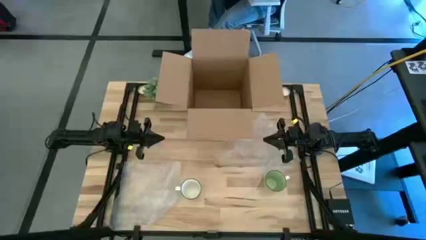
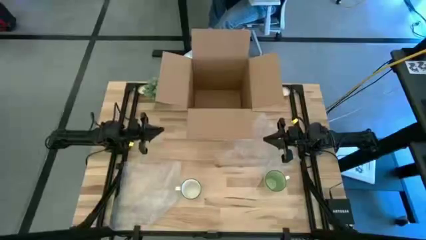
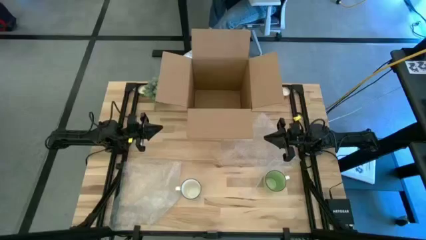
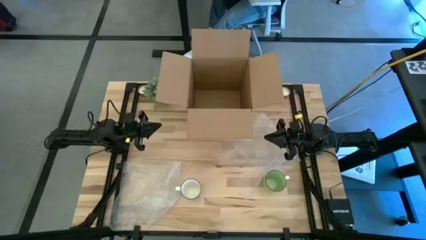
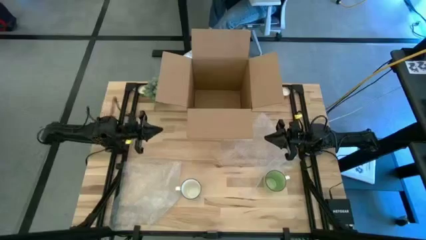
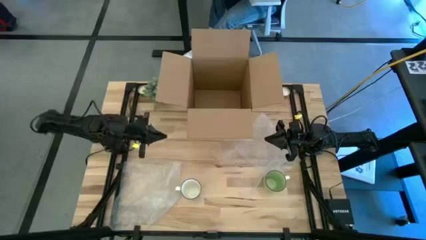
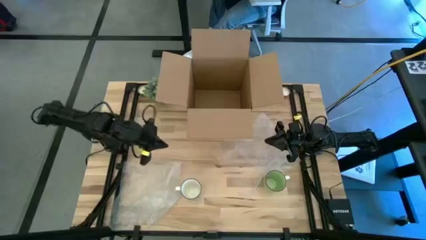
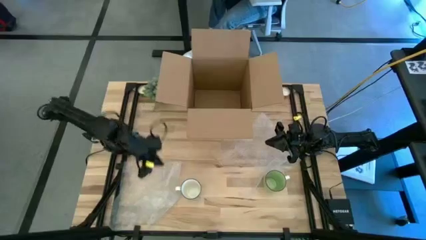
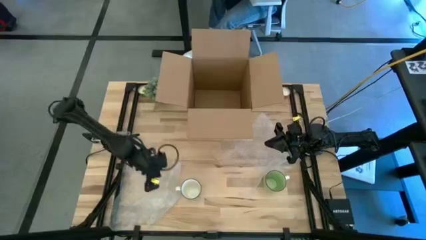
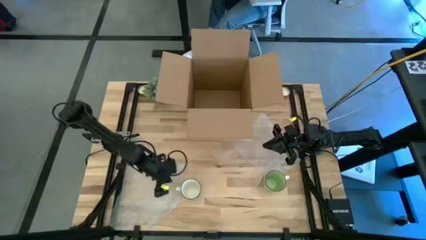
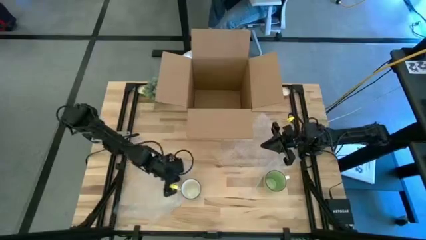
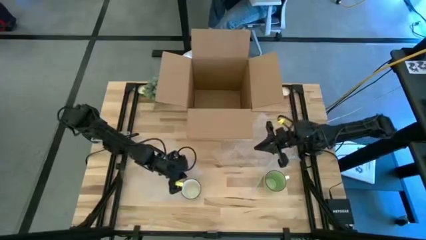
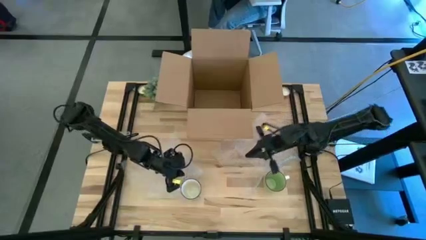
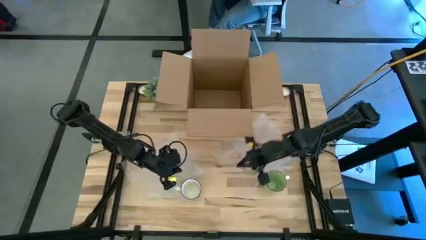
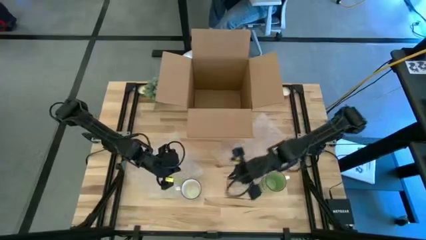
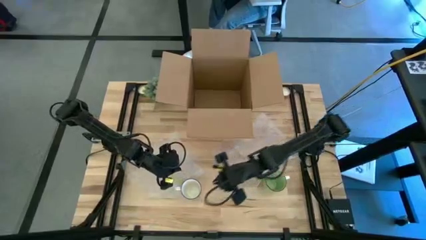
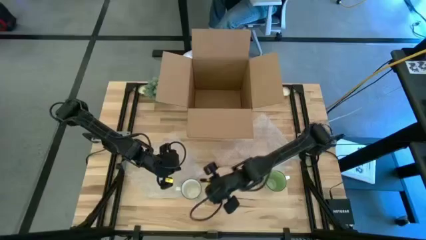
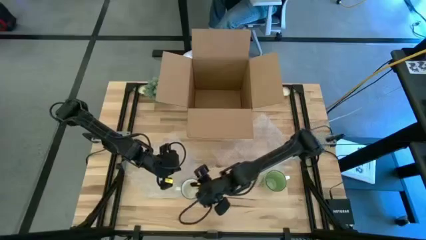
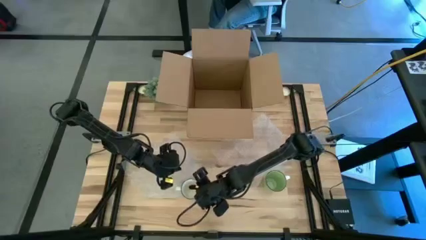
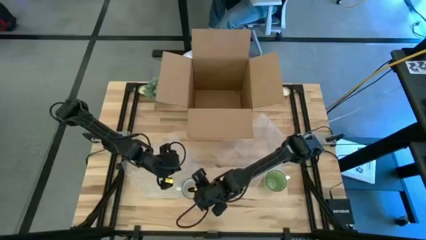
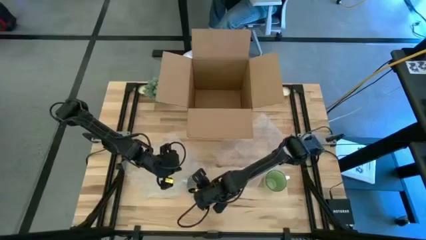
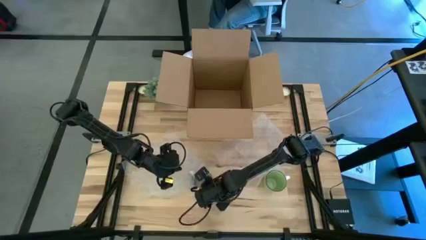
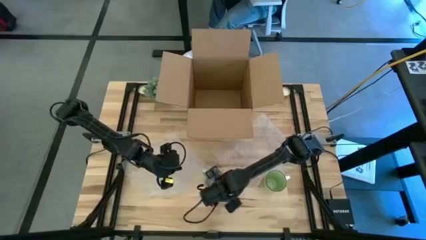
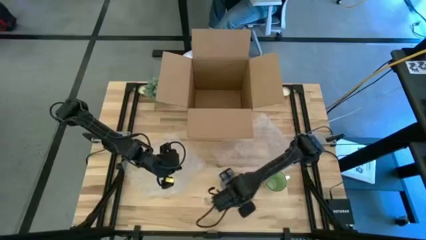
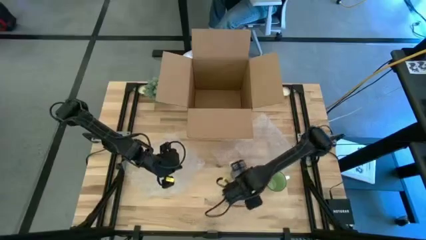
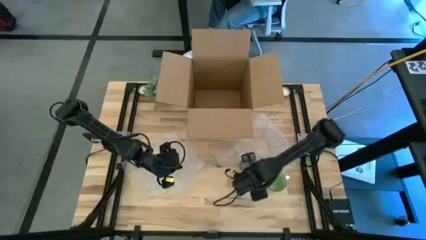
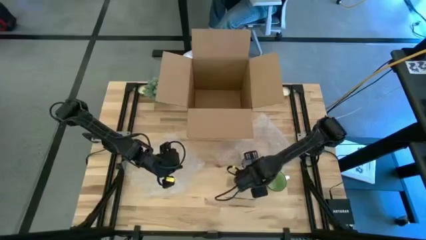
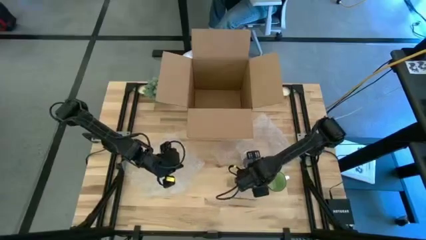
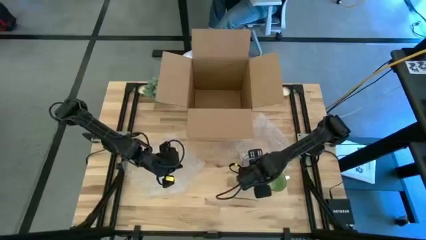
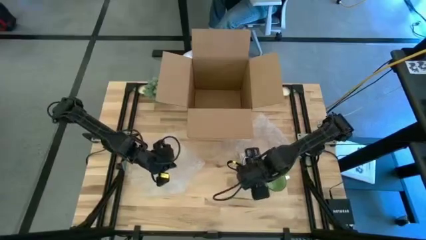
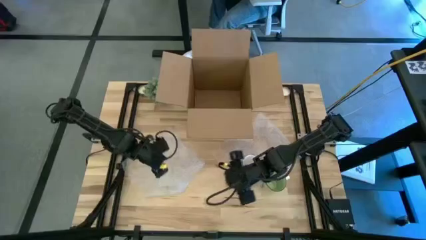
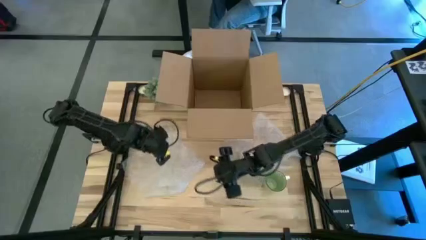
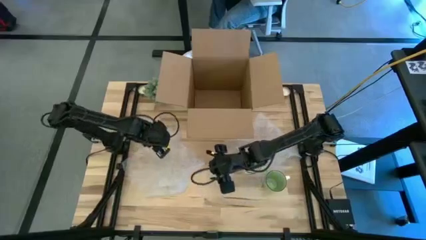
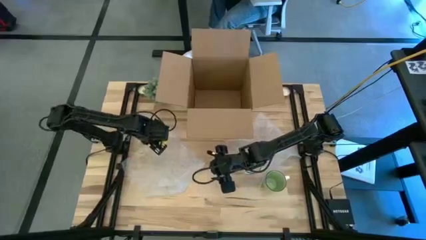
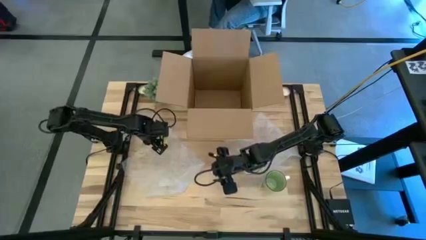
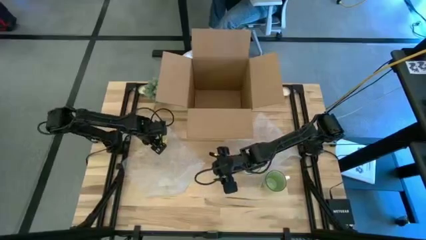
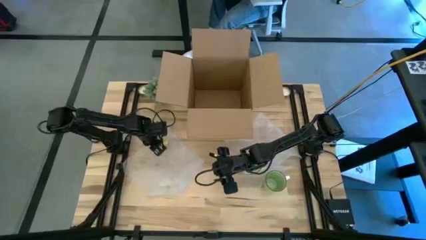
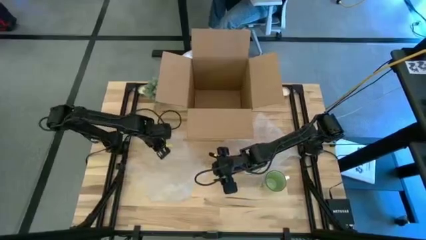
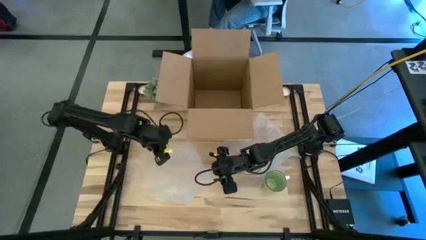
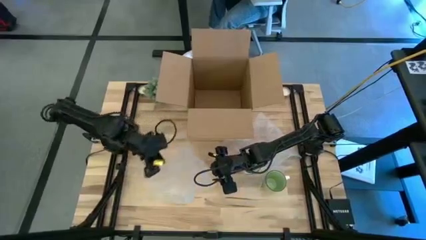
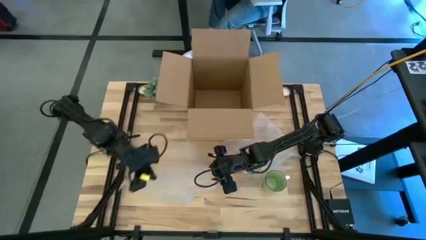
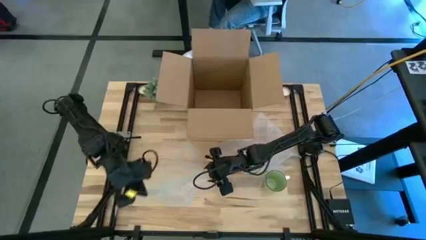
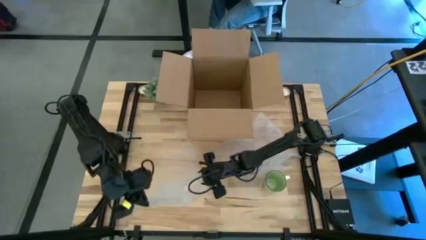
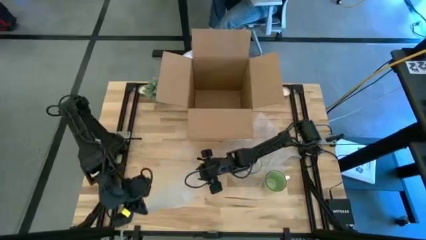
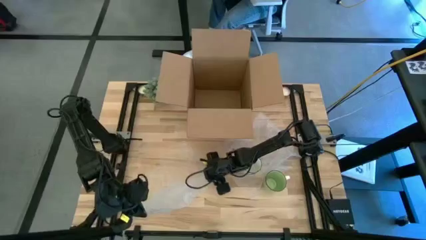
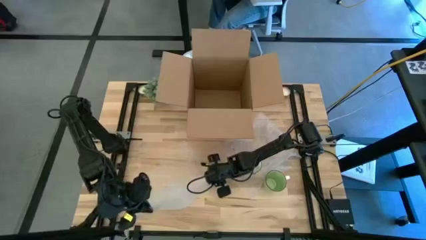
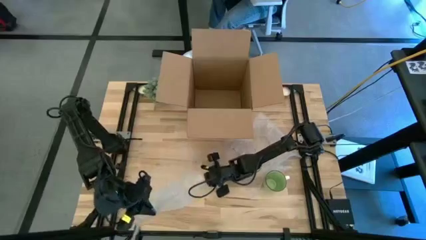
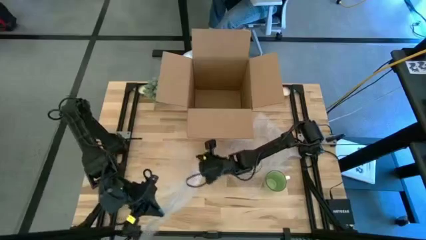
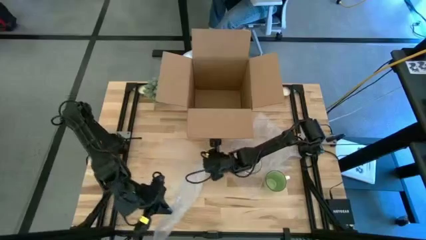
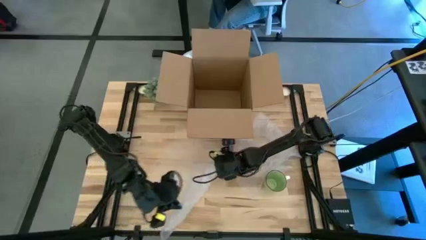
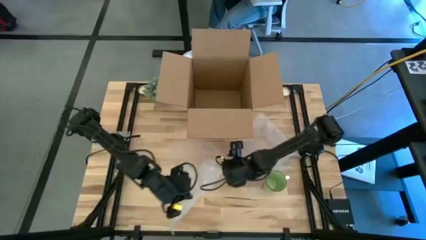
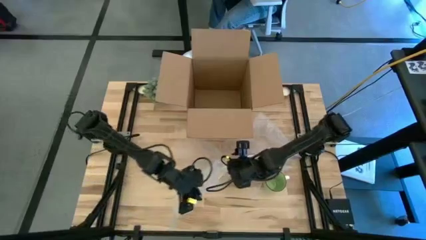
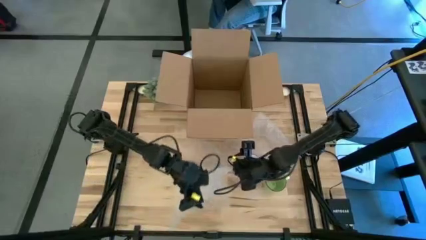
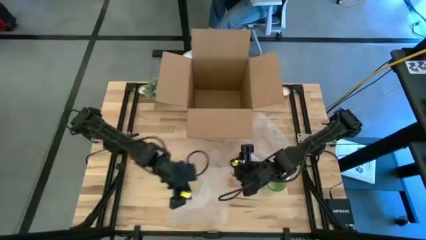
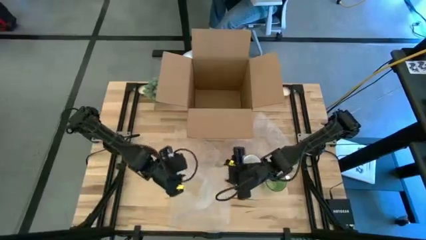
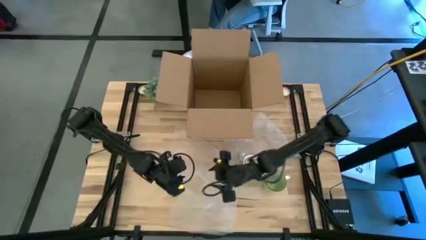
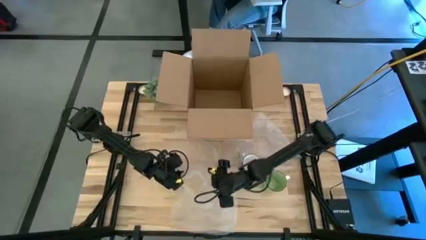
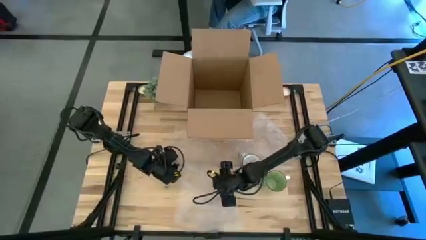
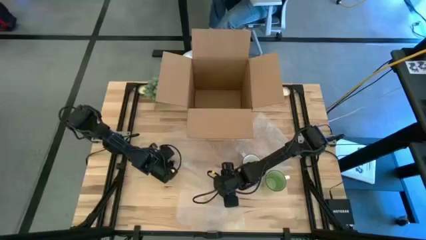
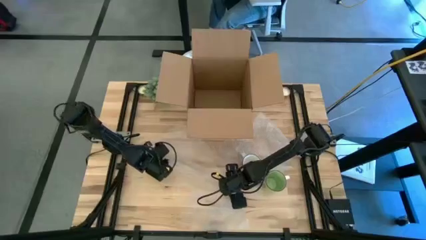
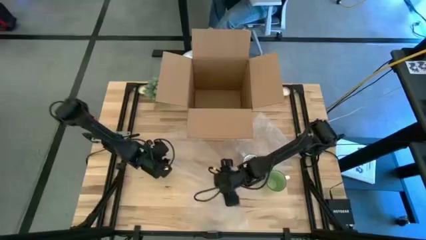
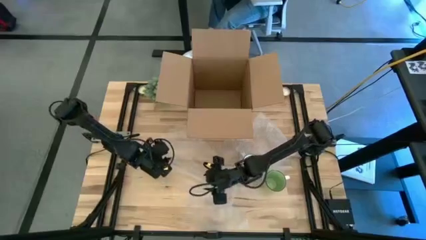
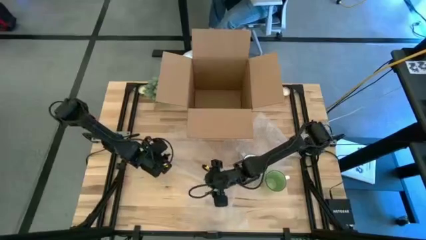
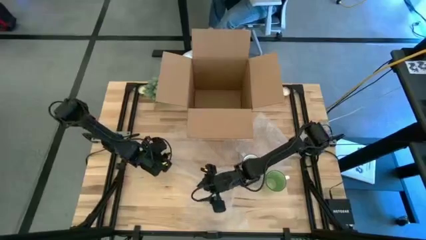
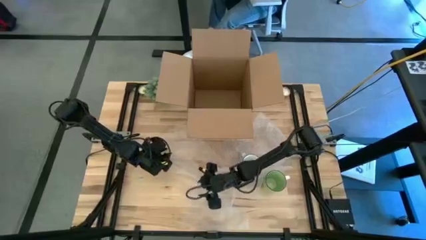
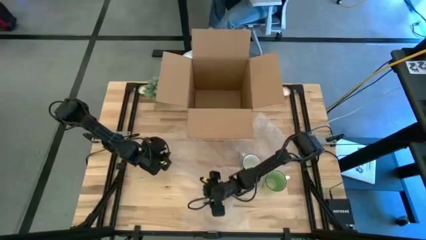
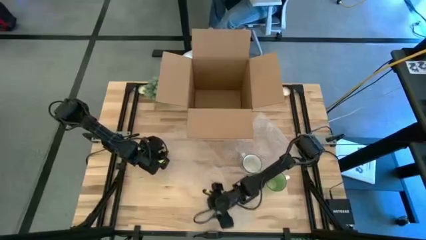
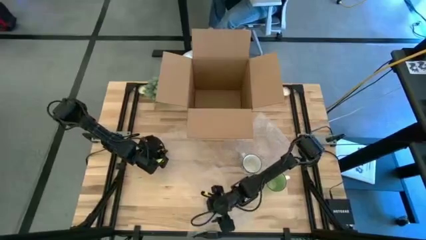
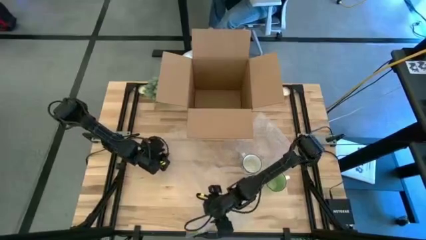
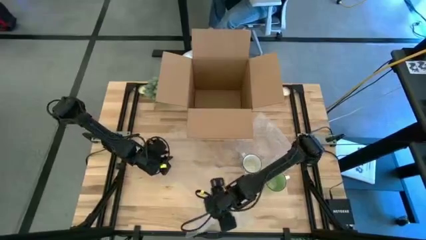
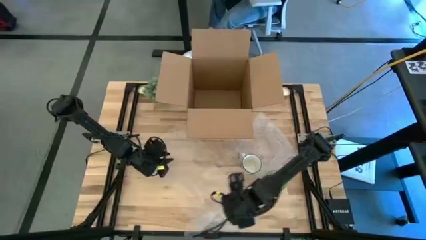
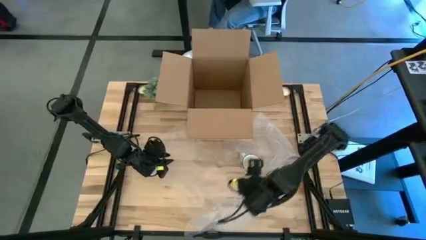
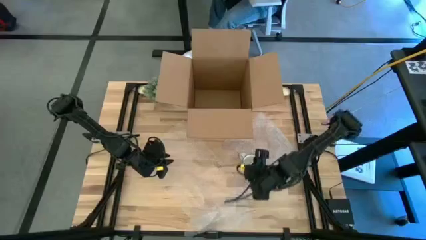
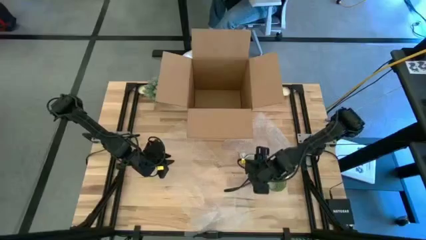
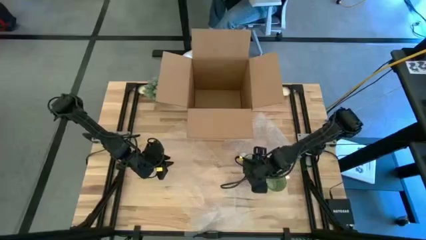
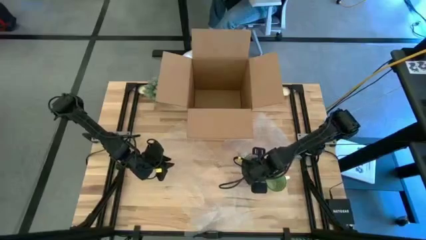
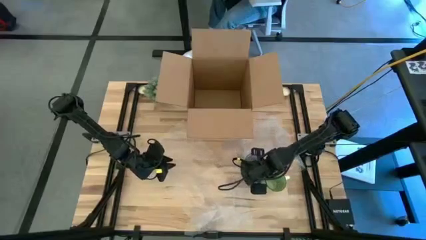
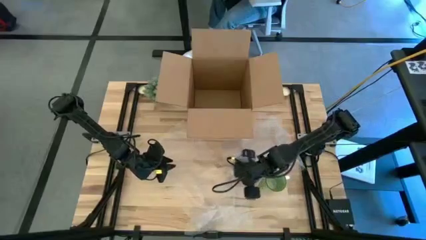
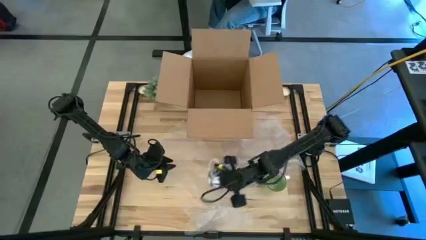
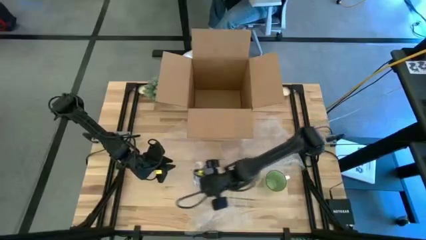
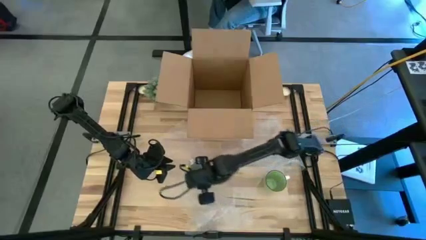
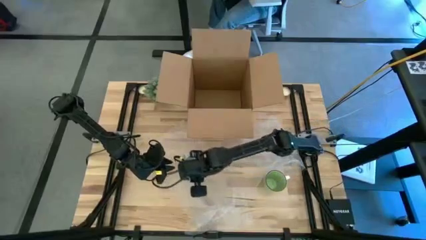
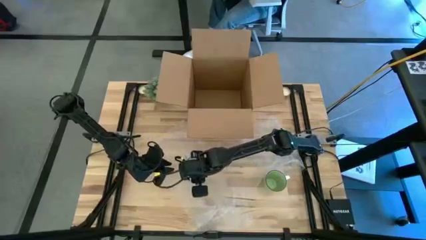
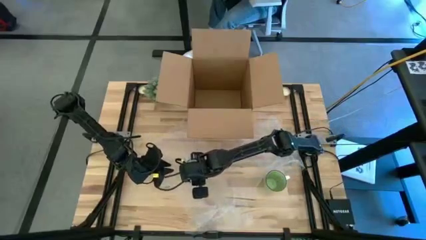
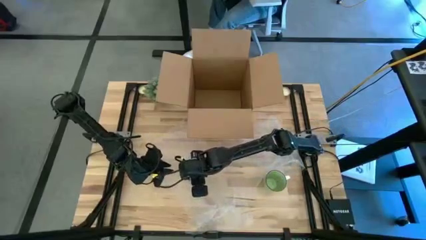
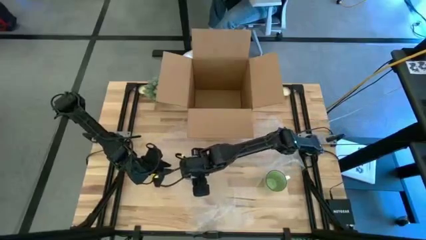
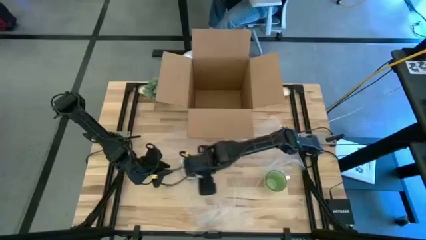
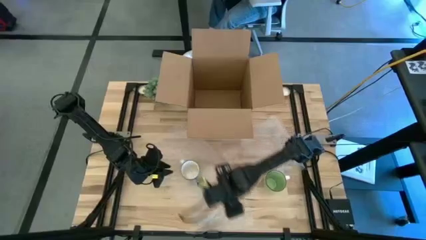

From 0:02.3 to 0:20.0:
Task: wrap mug
Wrap the white mug with bubble wrap
